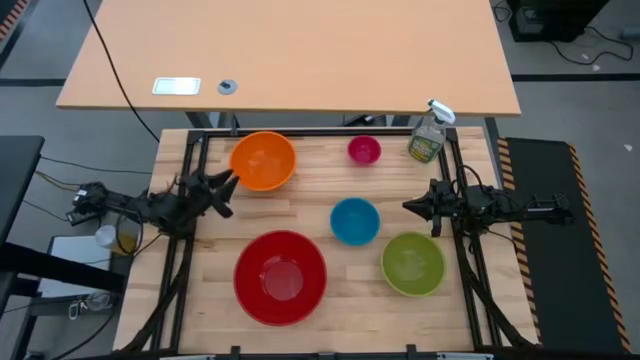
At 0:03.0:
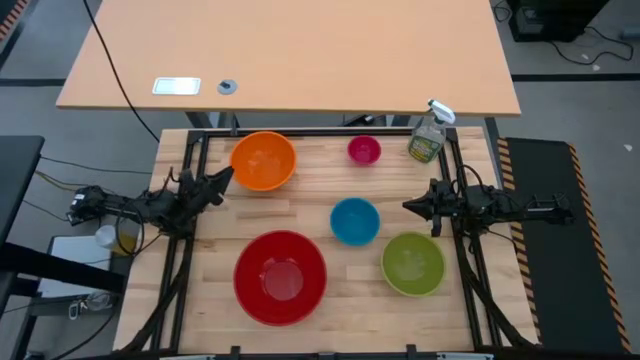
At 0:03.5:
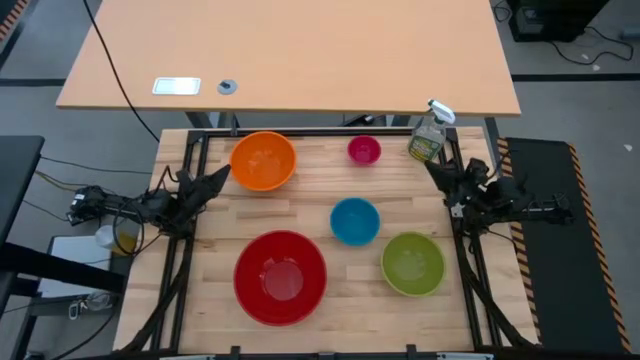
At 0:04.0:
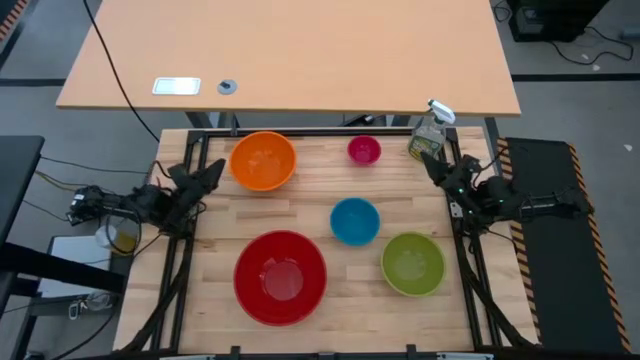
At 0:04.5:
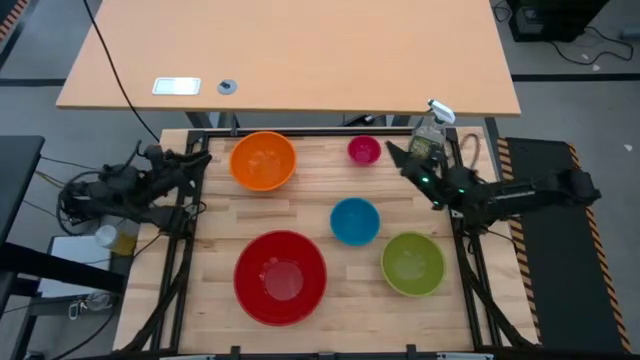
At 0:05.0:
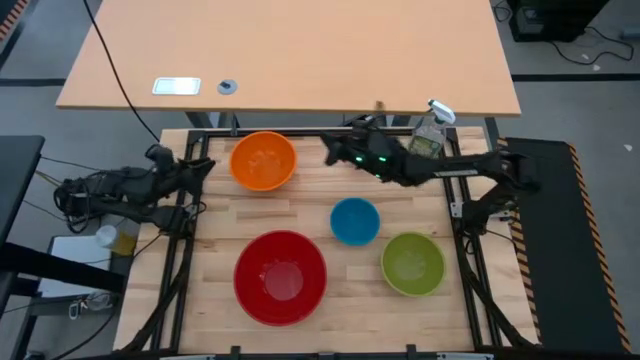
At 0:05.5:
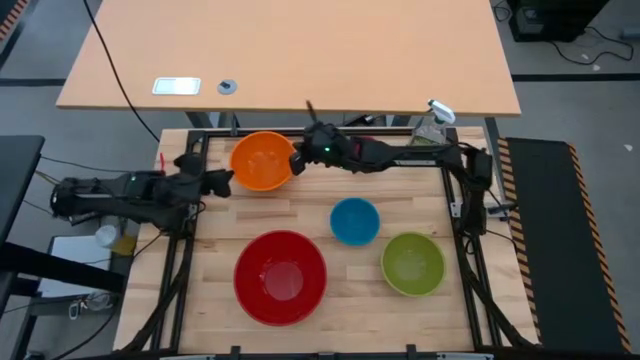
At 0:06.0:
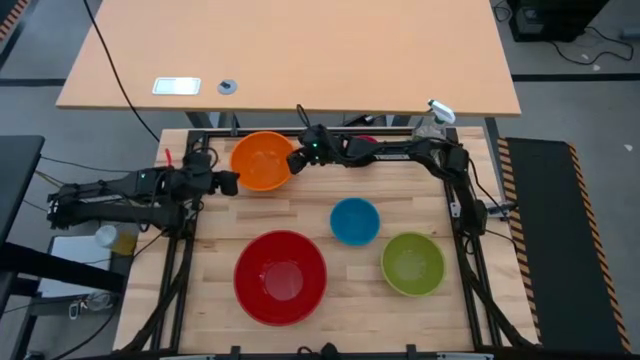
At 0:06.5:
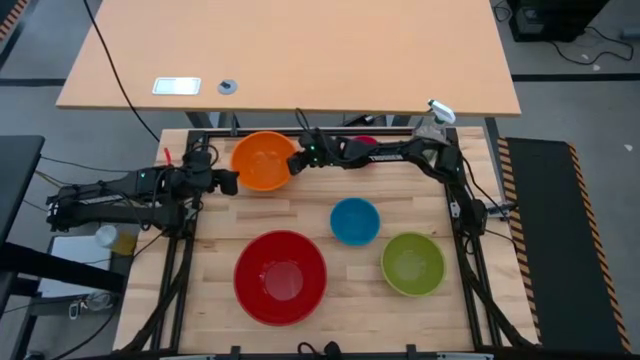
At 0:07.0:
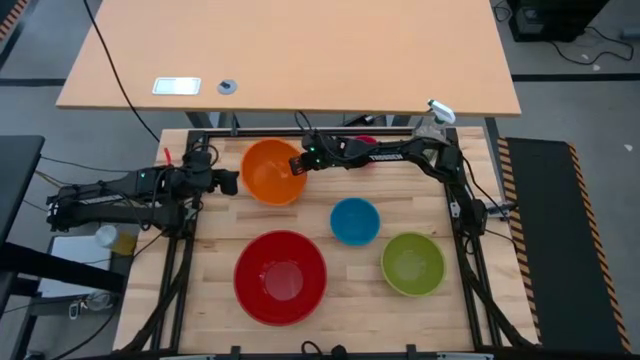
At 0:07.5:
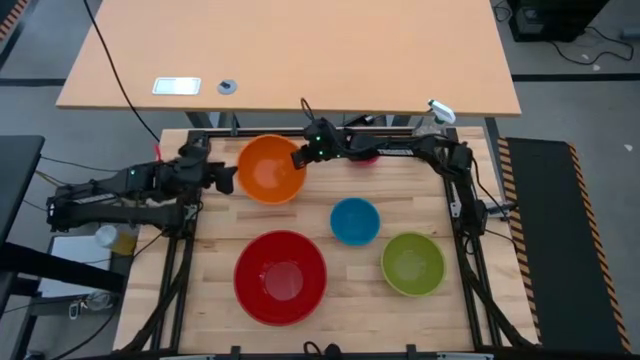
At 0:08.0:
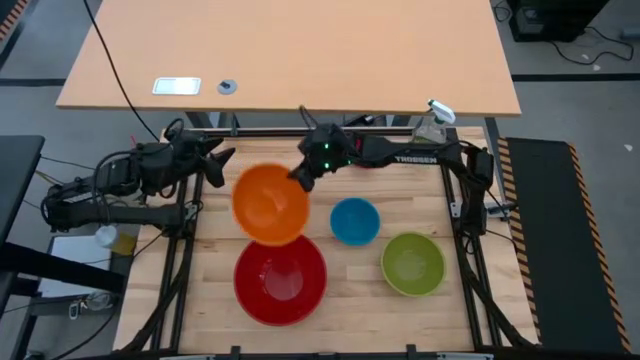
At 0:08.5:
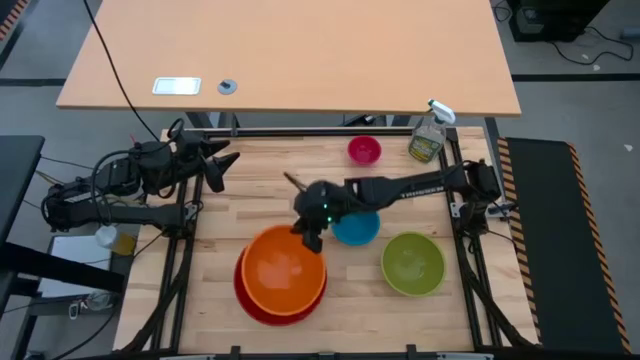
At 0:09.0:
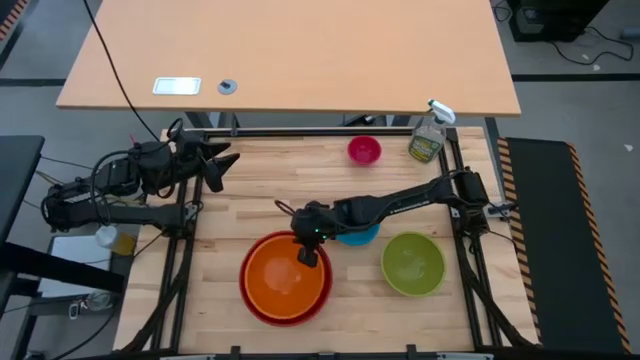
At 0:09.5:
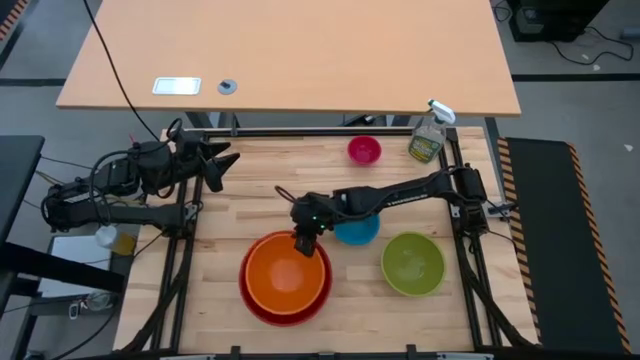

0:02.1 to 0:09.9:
Stack the large orange bowl on top of the extra large red bowl

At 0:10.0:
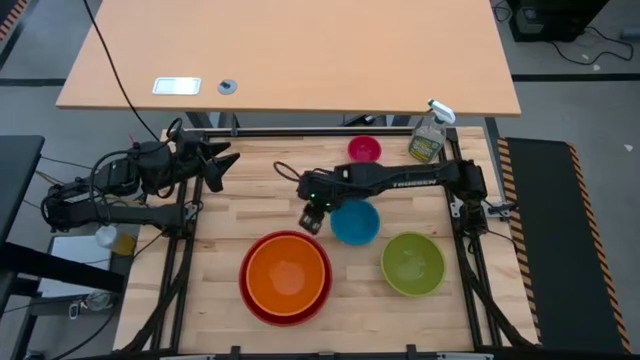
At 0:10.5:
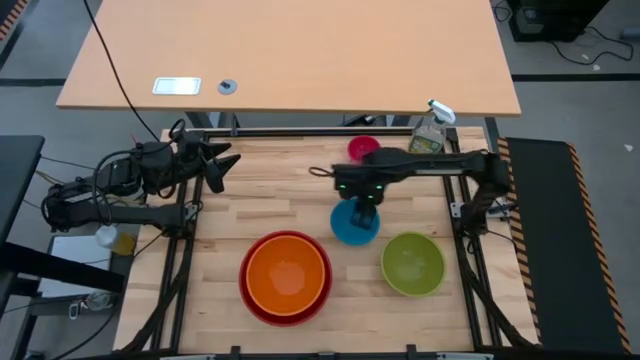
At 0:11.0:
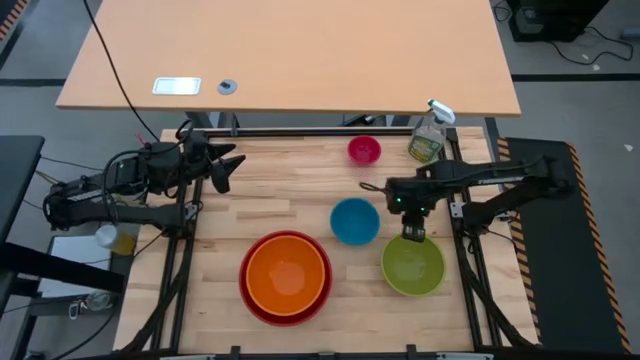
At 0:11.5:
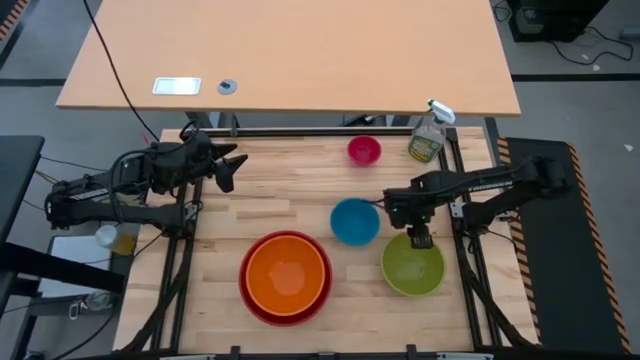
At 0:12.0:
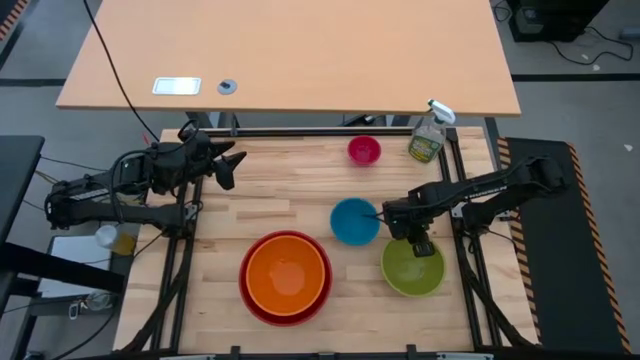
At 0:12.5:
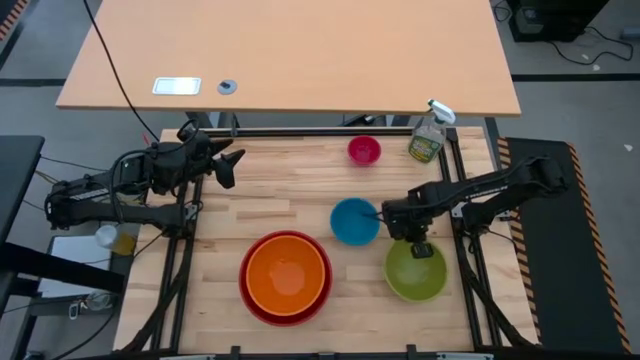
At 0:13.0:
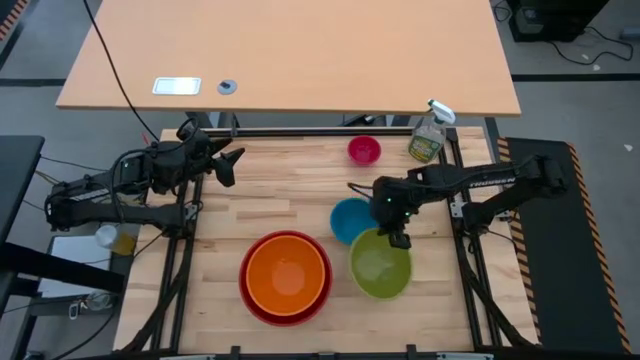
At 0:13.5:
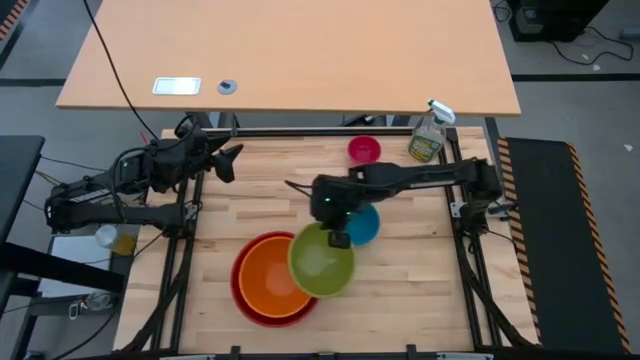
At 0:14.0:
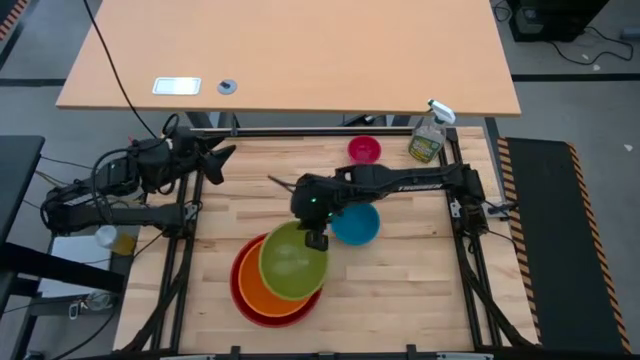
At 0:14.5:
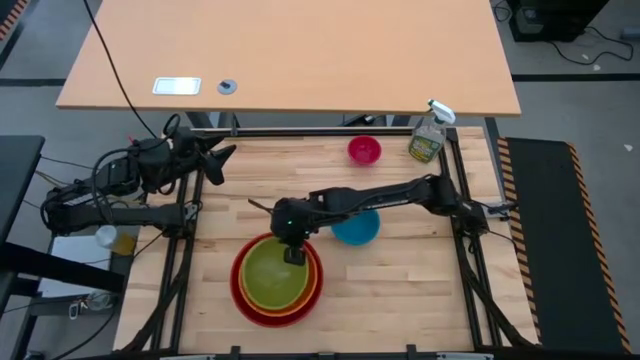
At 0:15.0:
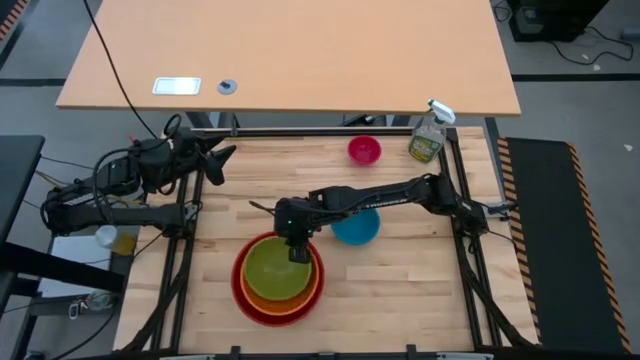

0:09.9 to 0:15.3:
Stack the medium green bowl on top of the large orange bowl

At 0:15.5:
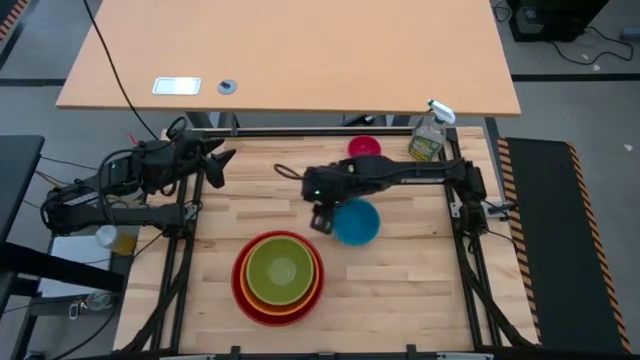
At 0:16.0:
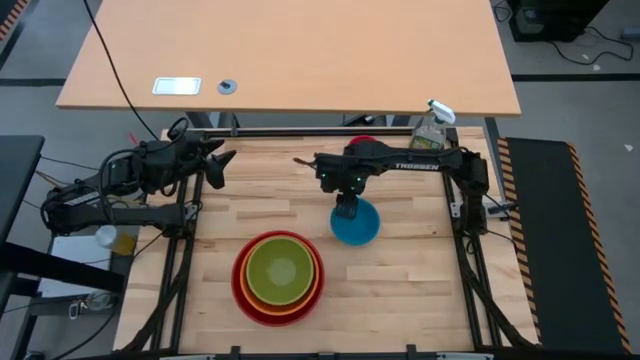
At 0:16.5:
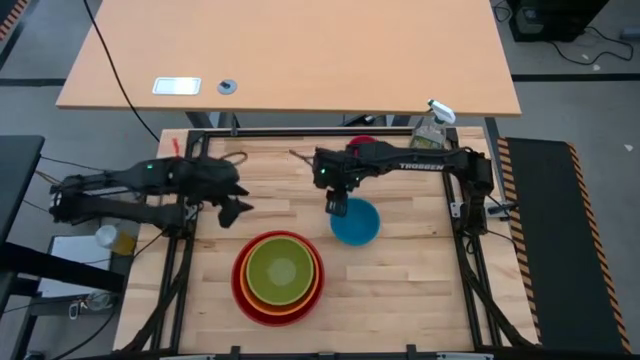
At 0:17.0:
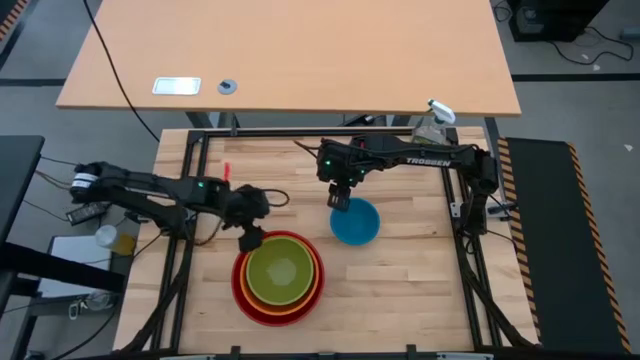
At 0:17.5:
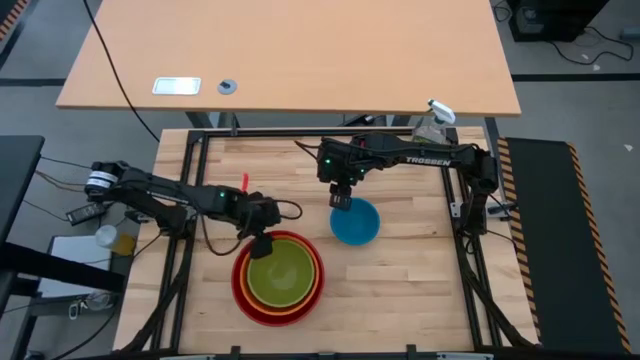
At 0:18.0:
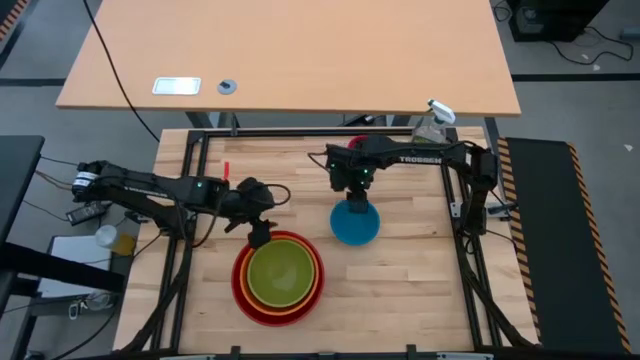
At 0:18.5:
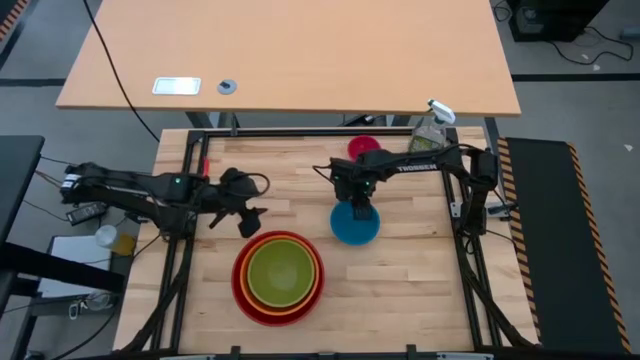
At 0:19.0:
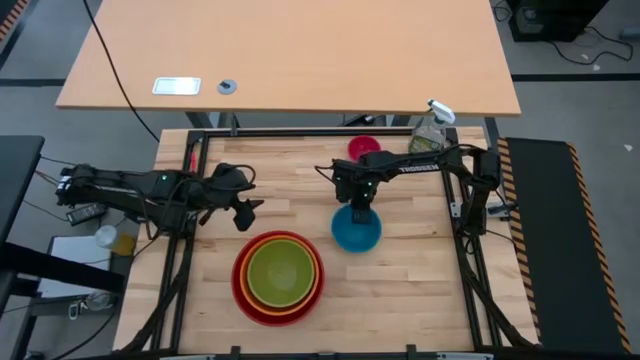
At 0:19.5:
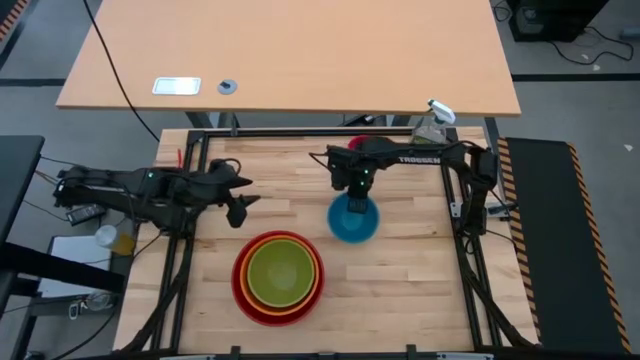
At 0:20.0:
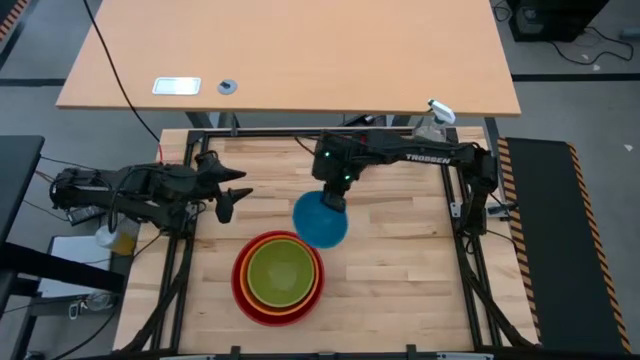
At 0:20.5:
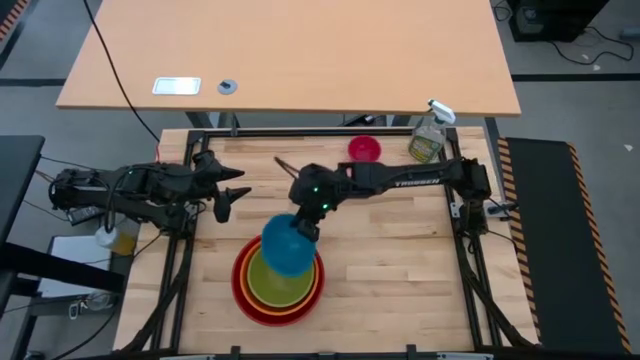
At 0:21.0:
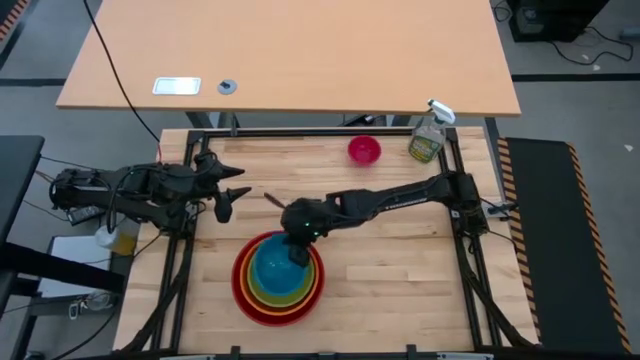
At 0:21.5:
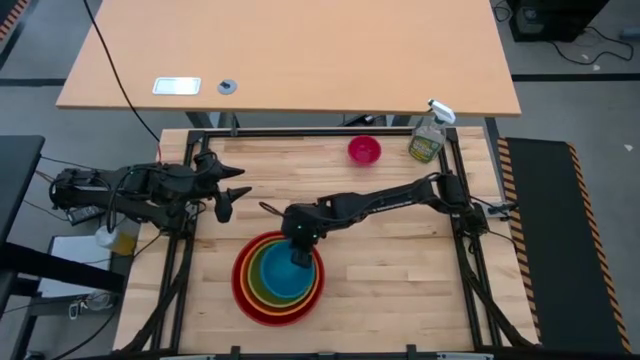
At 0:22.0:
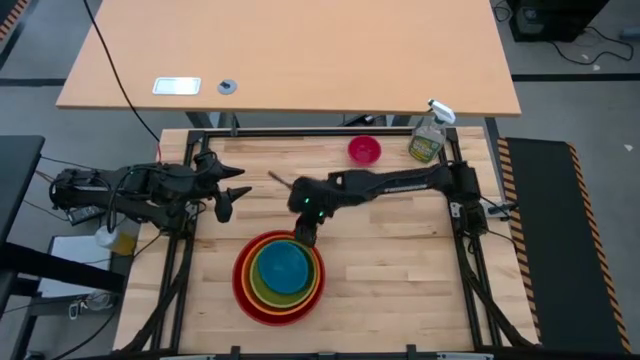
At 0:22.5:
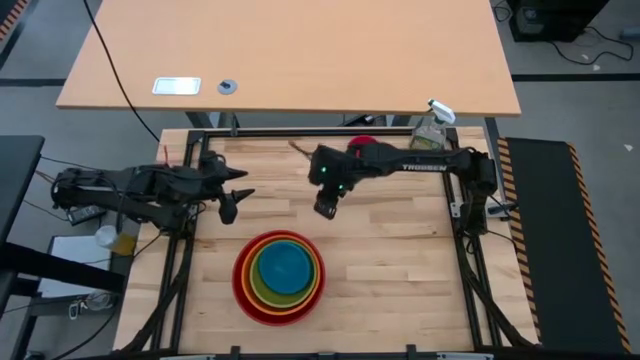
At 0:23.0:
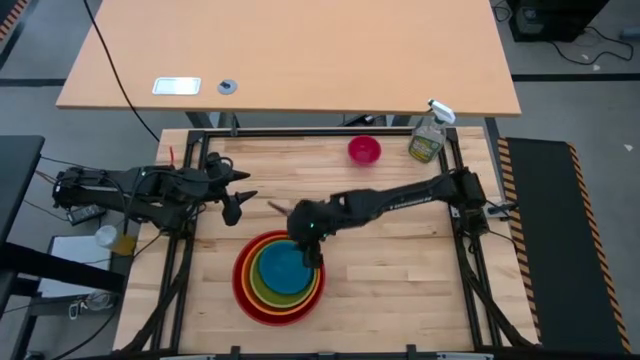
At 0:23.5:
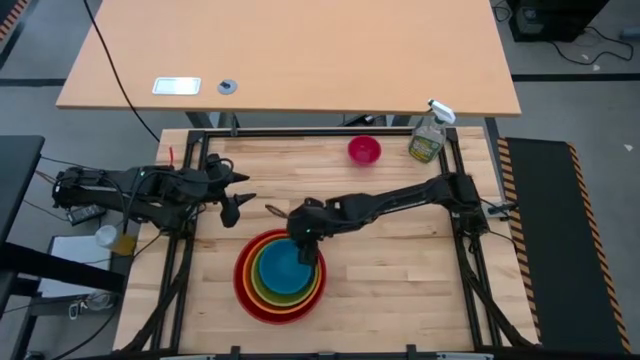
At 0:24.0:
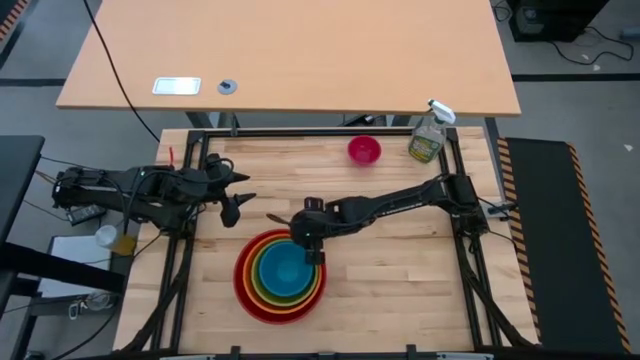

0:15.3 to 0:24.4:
Stack the small blue bowl on top of the medium green bowl
